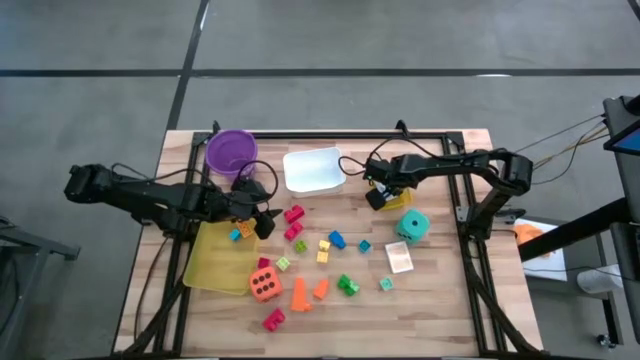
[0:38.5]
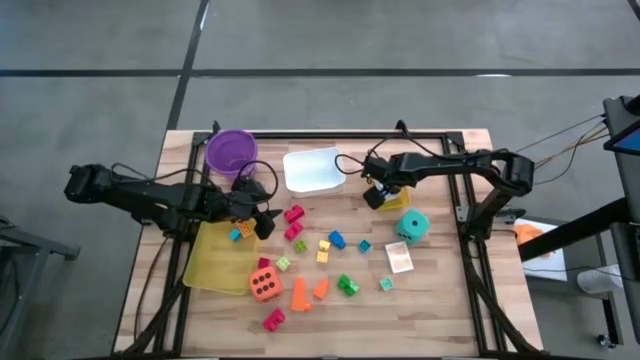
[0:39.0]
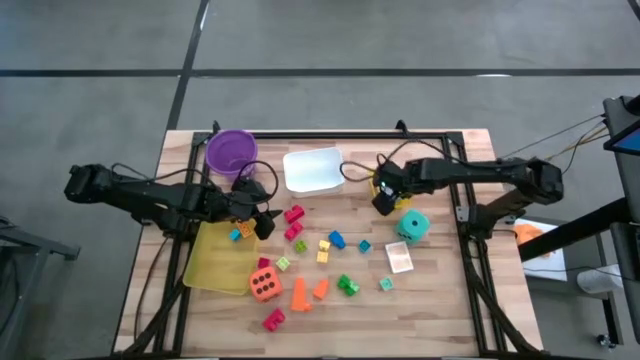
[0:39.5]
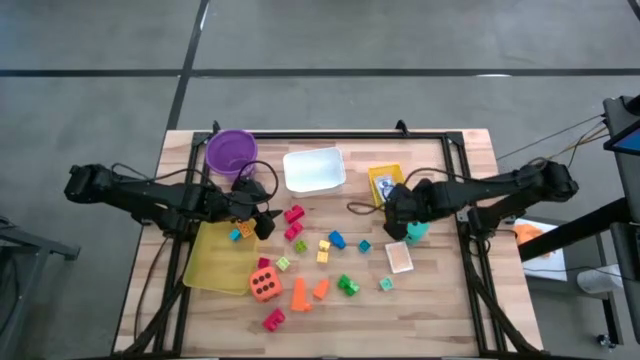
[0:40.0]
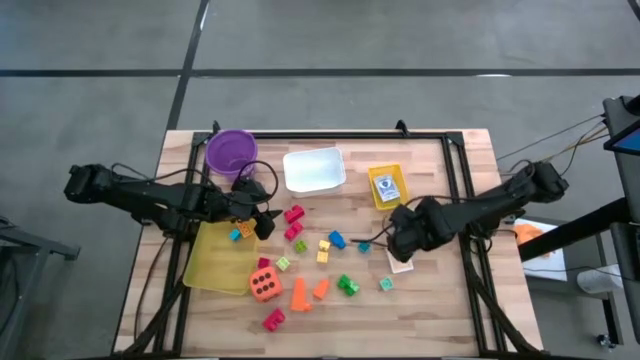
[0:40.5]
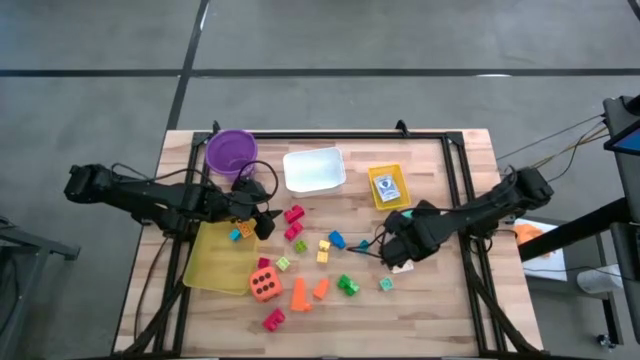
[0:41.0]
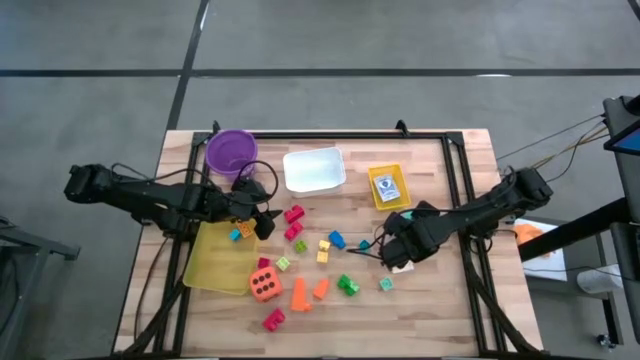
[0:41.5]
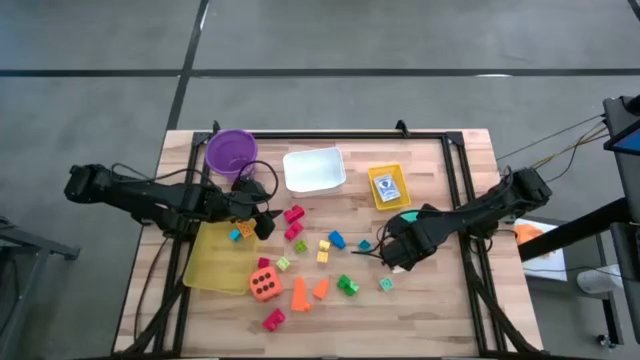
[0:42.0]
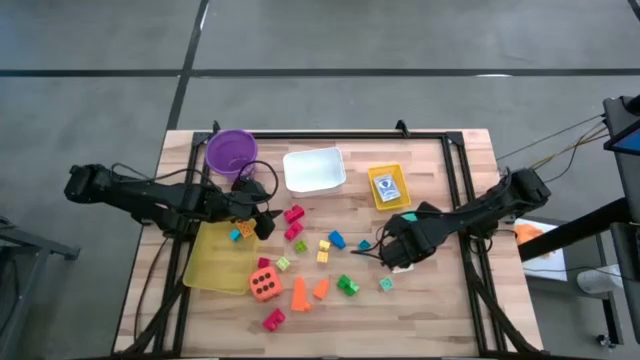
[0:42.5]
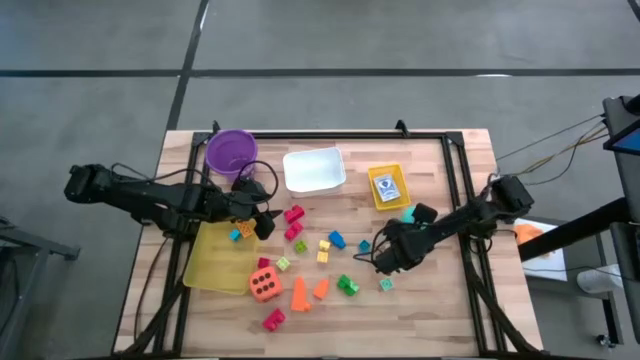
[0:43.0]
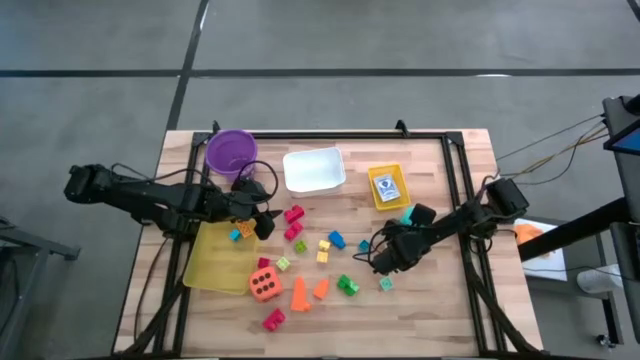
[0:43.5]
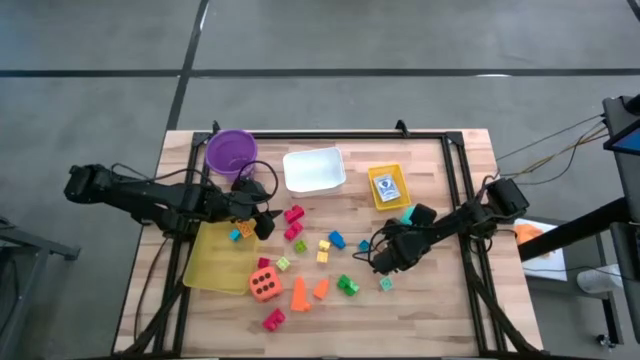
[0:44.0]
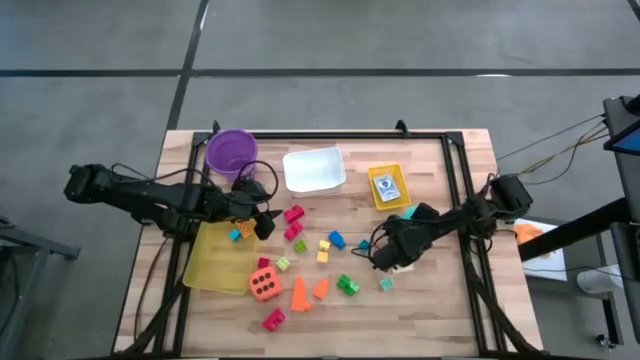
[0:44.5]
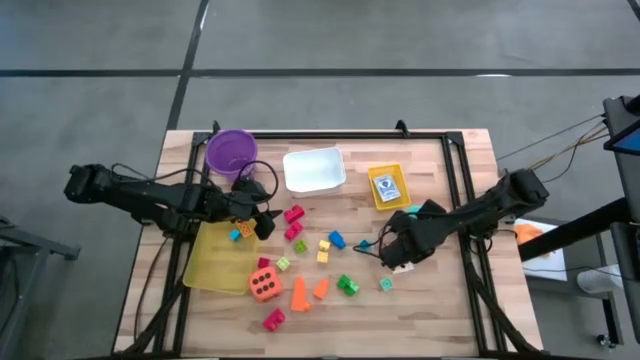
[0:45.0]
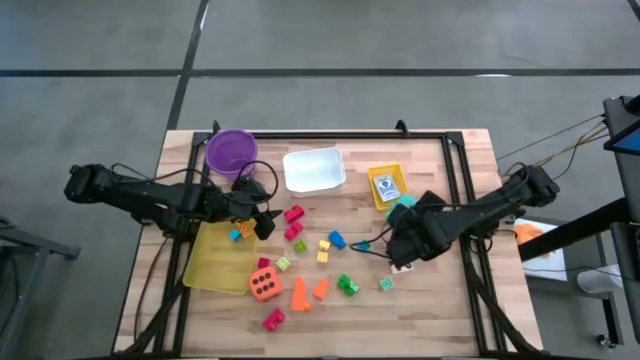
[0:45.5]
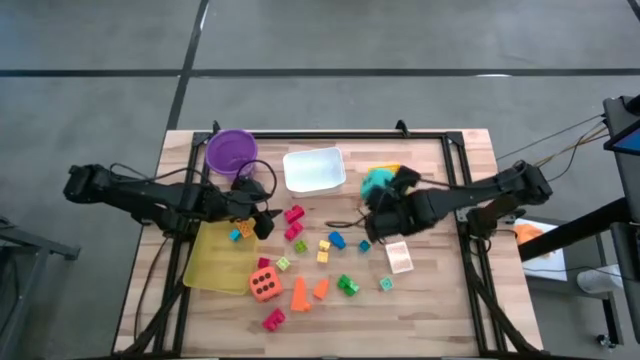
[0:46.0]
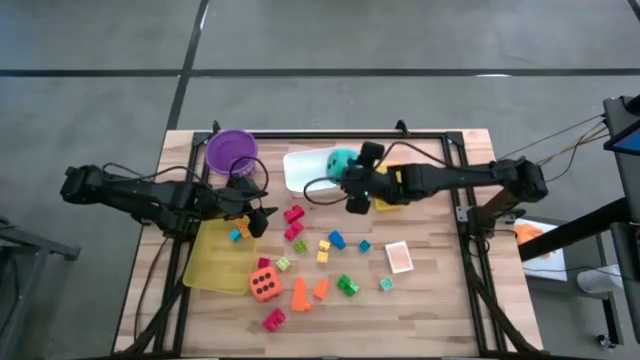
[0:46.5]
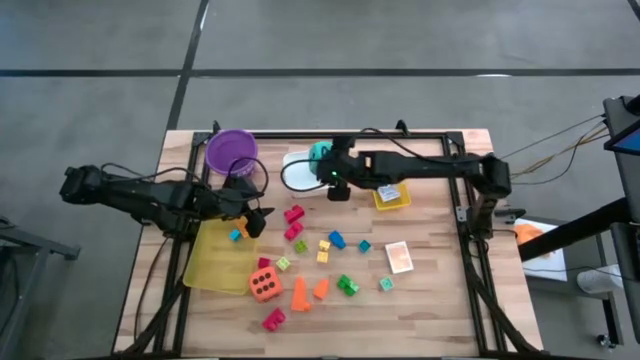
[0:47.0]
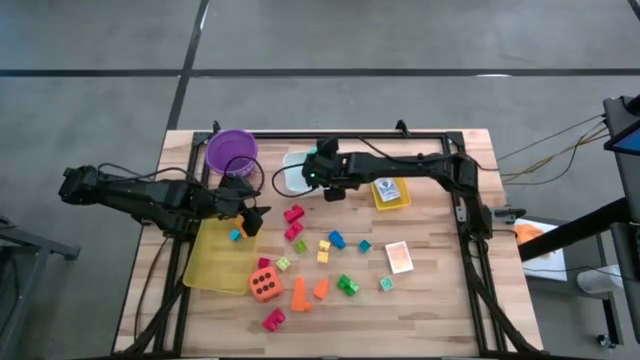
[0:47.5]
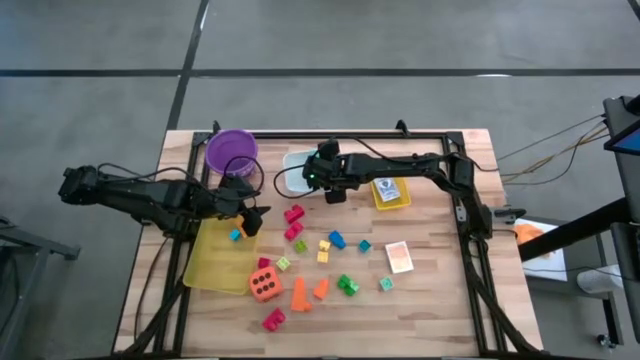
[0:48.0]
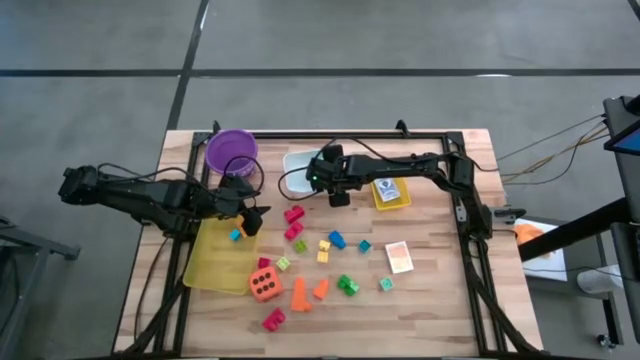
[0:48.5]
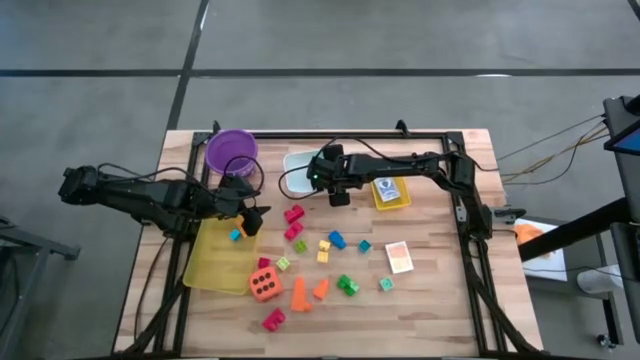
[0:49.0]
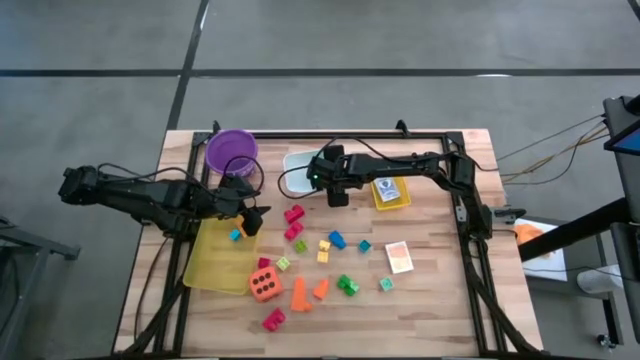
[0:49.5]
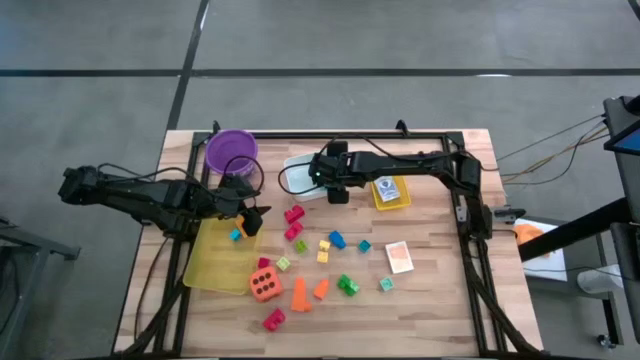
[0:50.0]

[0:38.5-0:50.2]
Task: Pick & Place Toys
Put the blue dice into the white bin

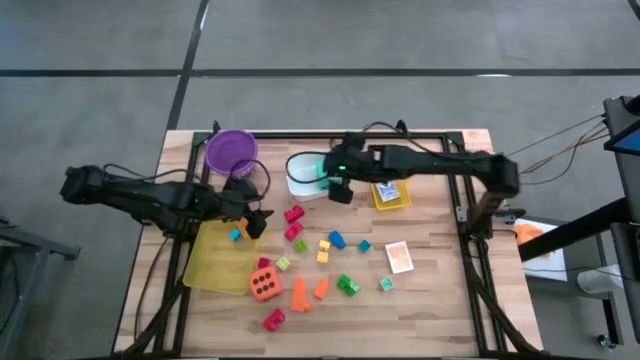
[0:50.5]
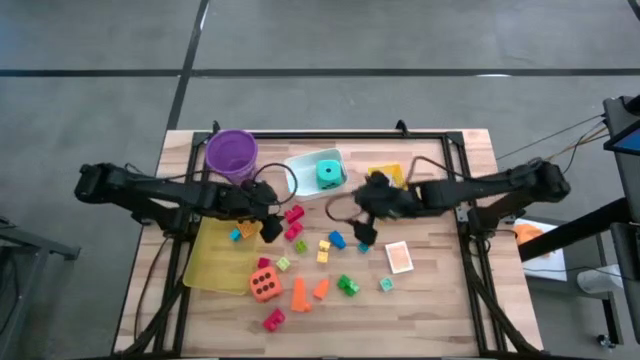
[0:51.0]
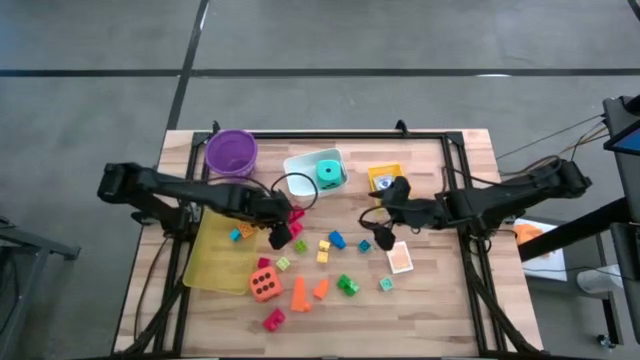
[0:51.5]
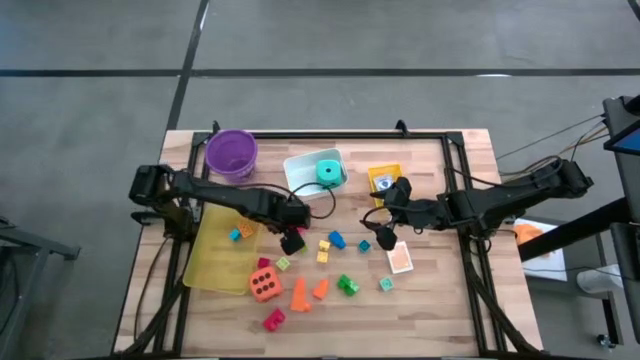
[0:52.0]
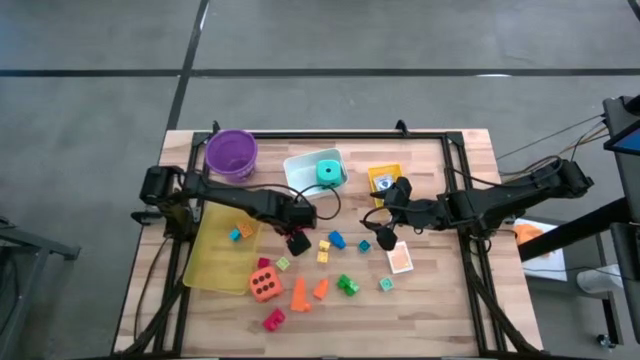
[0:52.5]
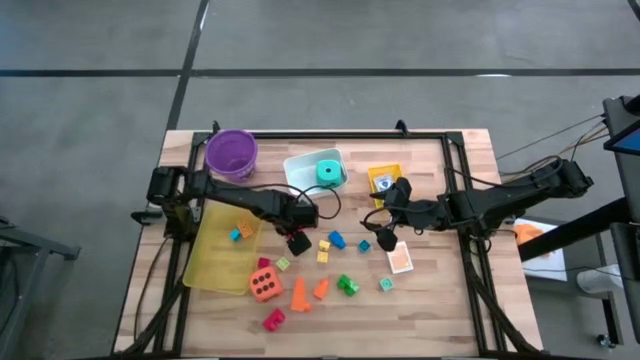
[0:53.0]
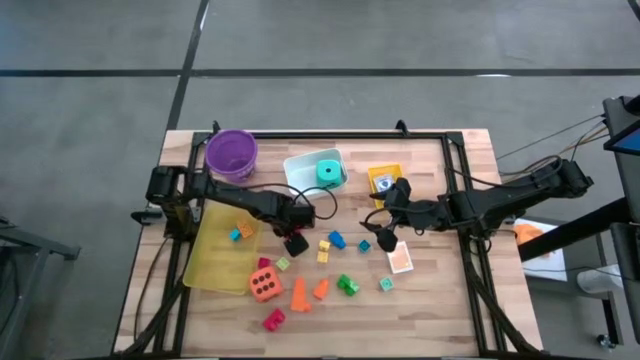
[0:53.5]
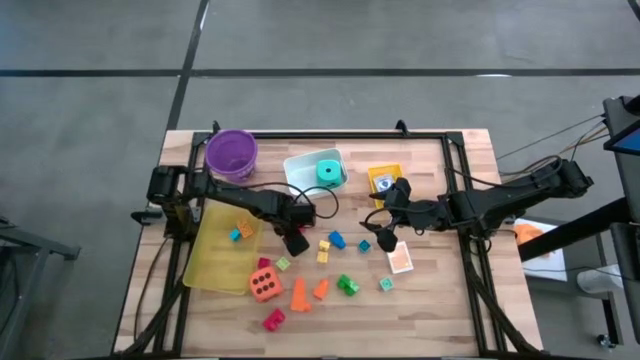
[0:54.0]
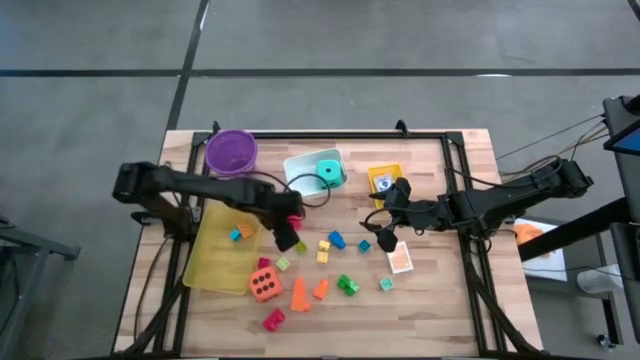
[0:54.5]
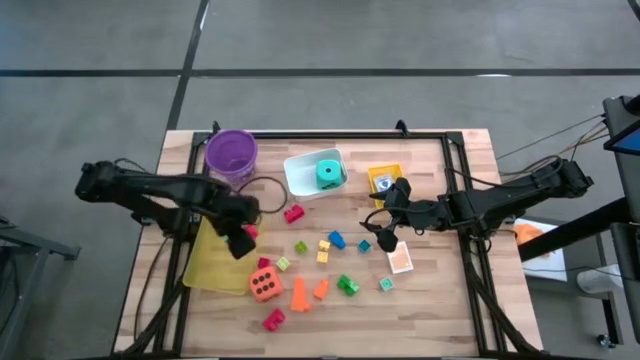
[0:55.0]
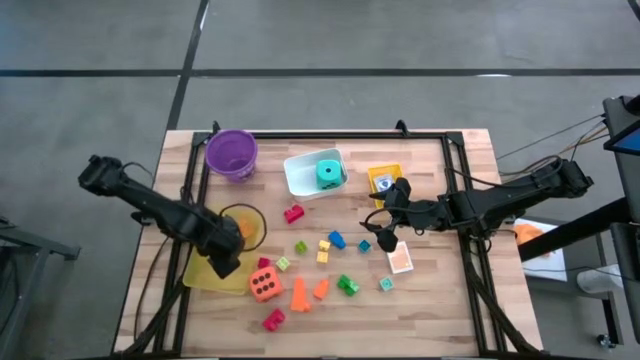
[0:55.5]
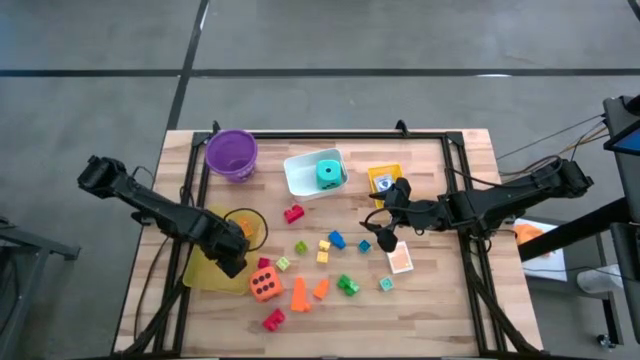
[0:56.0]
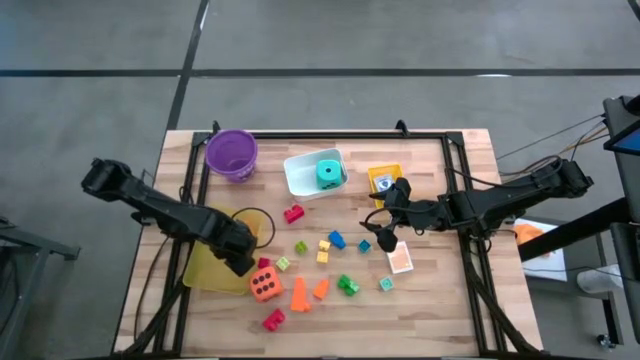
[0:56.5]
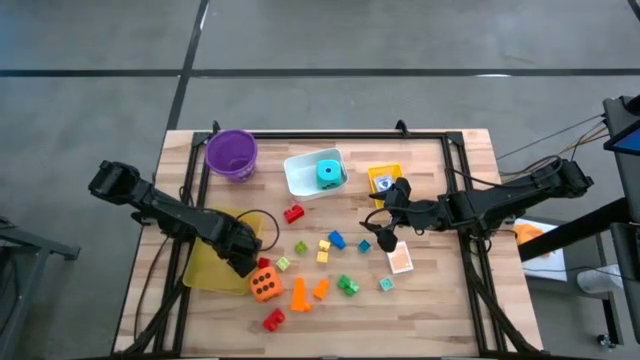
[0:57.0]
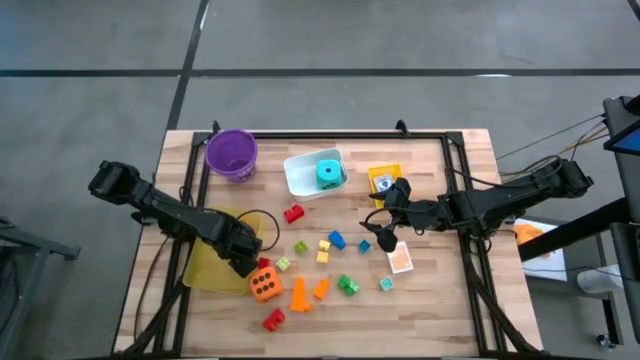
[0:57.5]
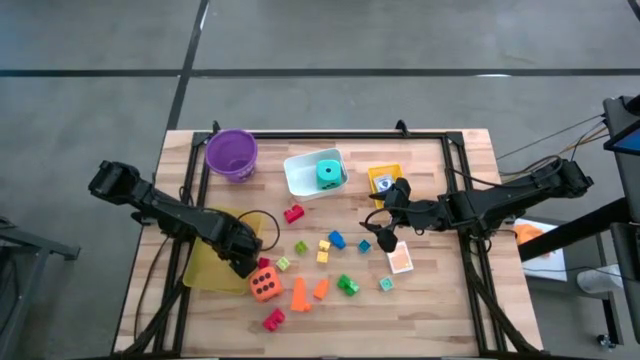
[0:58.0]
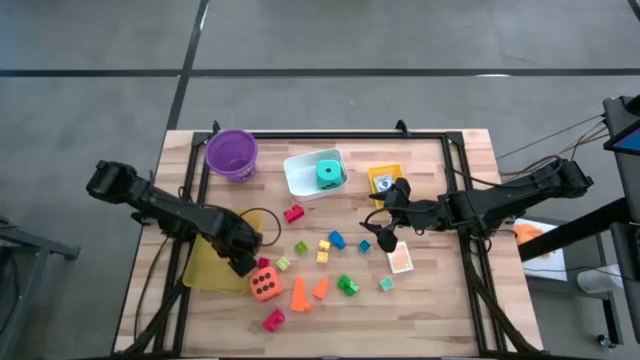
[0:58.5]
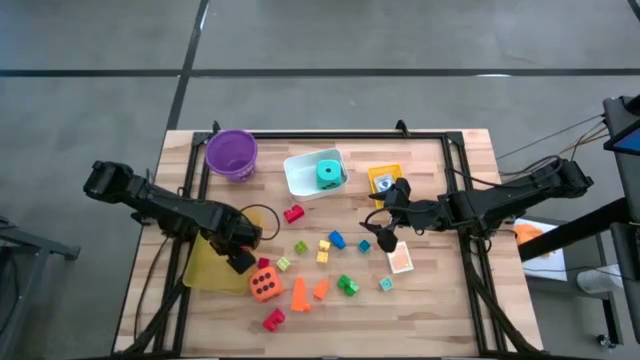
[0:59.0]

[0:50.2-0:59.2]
Put the red game piece into the light yellow bin
